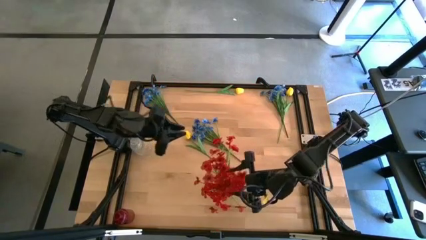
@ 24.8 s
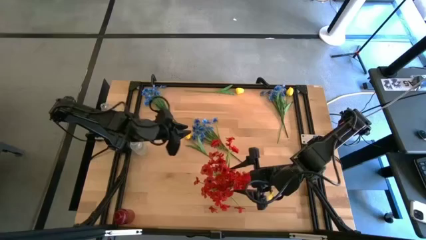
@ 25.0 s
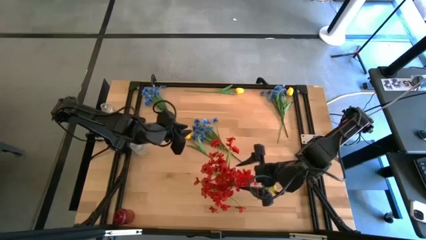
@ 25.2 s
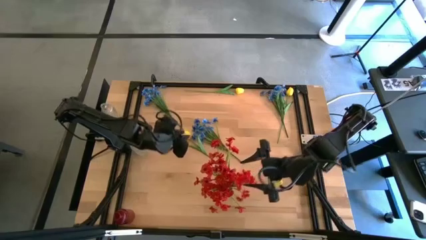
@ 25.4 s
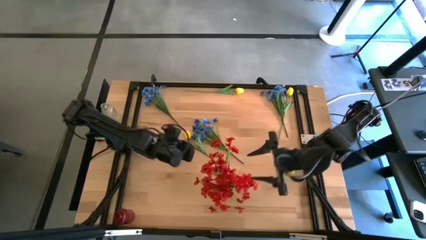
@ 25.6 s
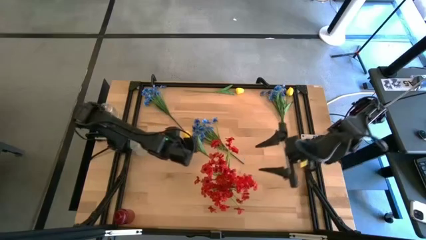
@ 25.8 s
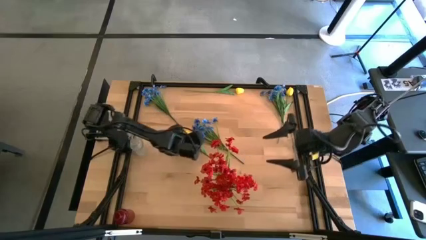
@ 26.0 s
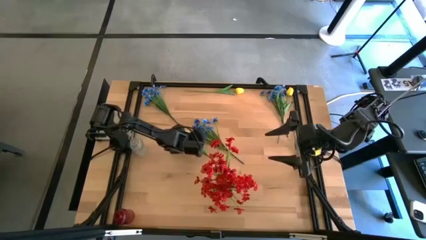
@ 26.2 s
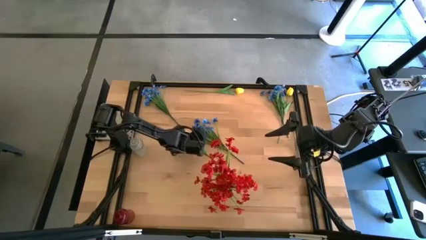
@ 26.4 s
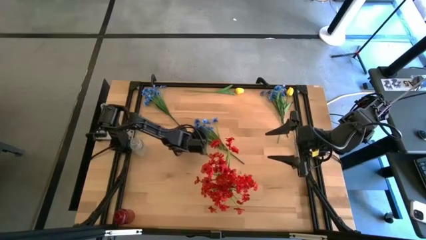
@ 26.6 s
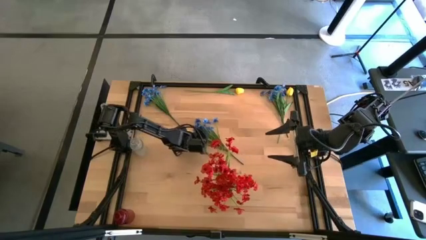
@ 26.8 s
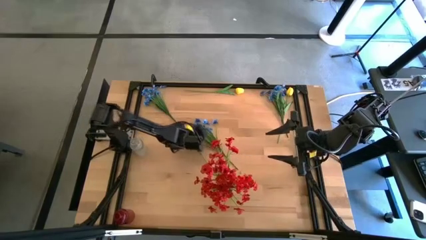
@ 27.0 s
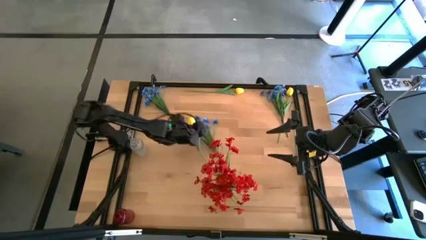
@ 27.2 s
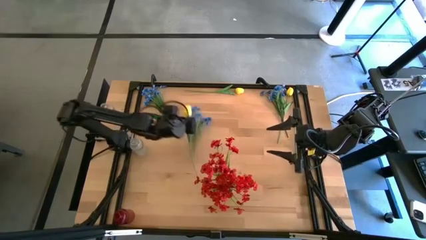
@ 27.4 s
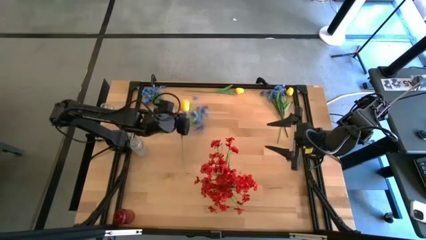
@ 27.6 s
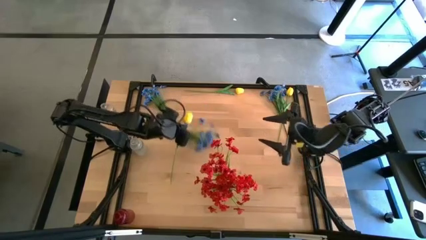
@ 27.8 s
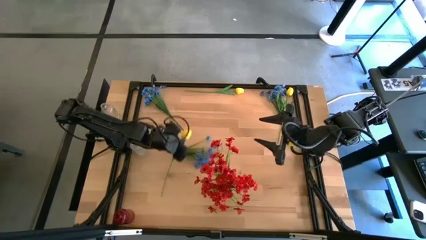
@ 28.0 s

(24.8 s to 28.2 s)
Task: Sort flowers into vase by color
Put the bottom yellow tulip into the transparent vase

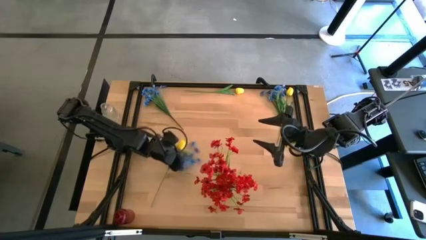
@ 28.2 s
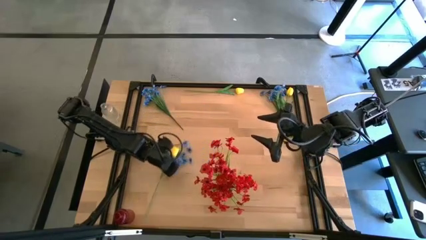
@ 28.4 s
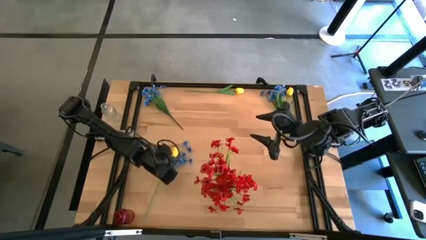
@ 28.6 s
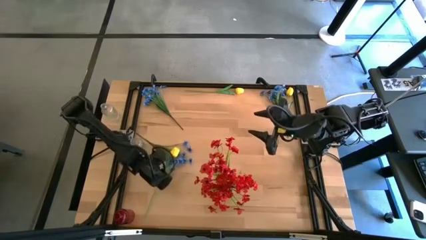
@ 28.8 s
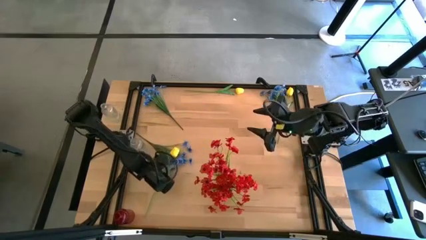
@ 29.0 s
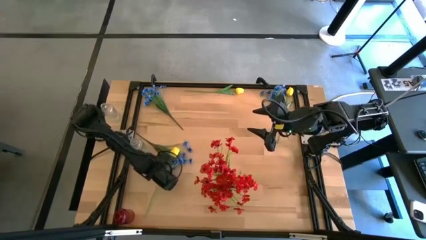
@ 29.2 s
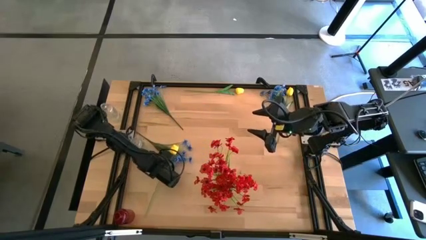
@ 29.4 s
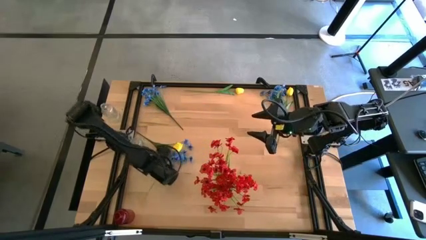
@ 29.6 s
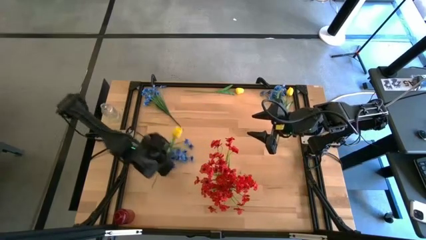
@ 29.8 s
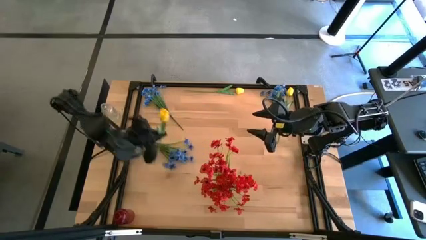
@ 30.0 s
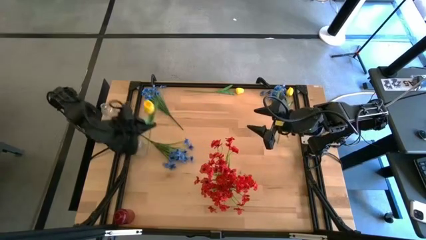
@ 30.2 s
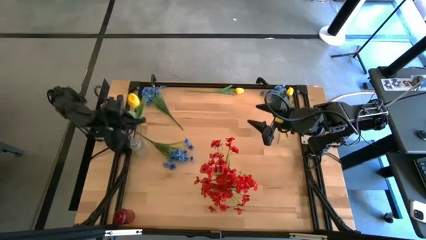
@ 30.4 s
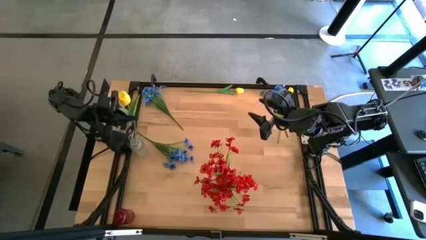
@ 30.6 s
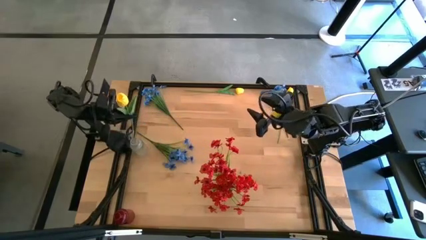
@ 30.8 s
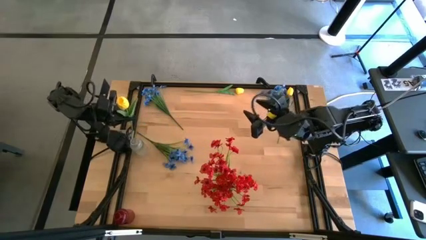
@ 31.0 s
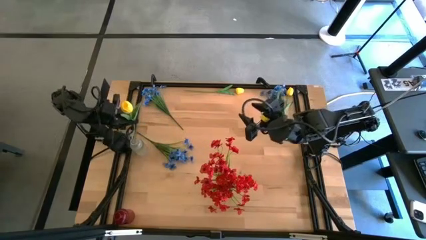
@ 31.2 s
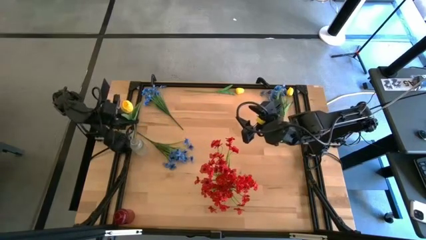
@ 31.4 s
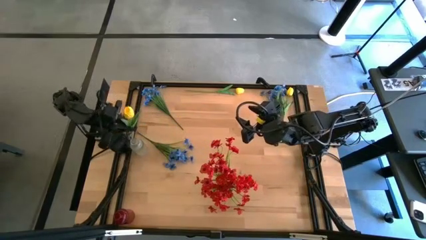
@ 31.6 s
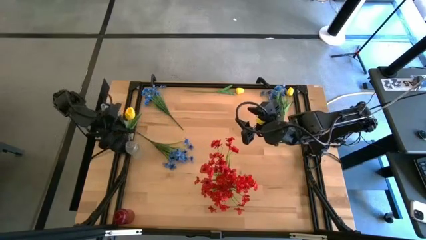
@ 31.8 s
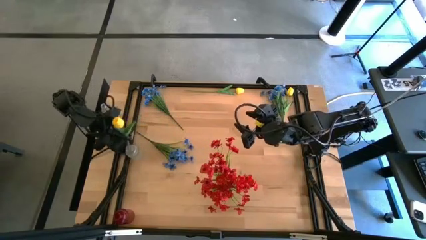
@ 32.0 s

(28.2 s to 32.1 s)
Put the bottom yellow tulip into the transparent vase

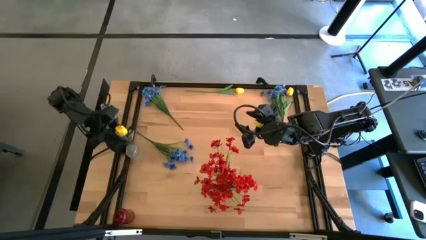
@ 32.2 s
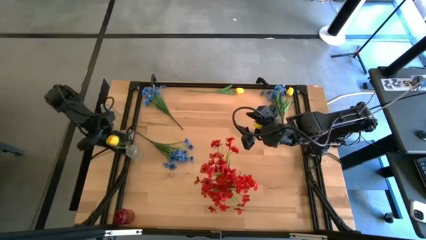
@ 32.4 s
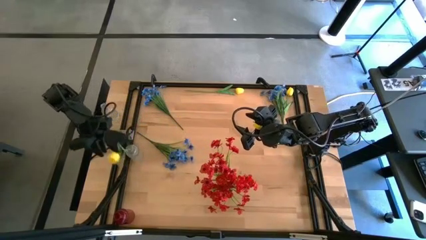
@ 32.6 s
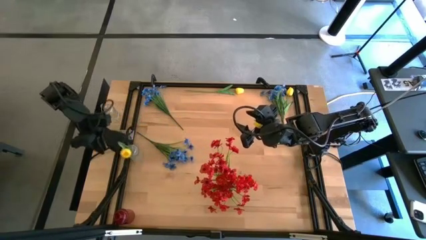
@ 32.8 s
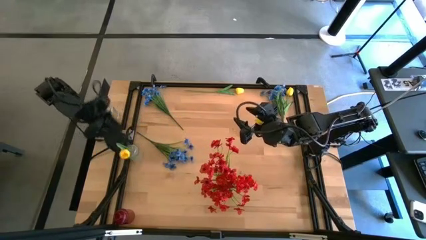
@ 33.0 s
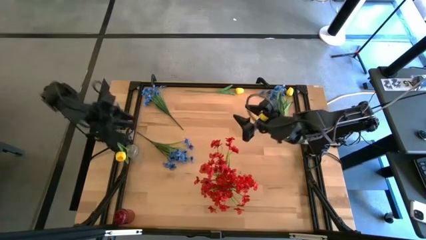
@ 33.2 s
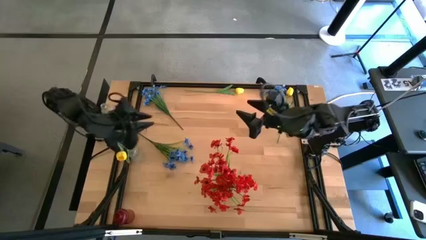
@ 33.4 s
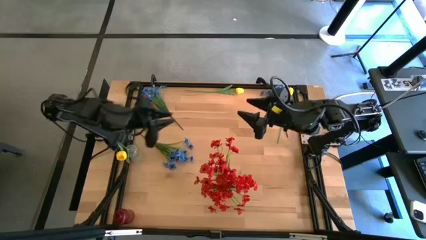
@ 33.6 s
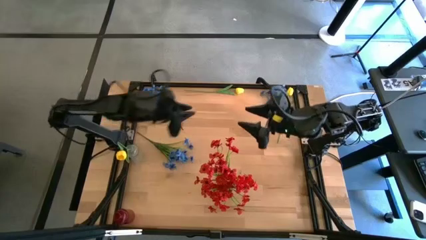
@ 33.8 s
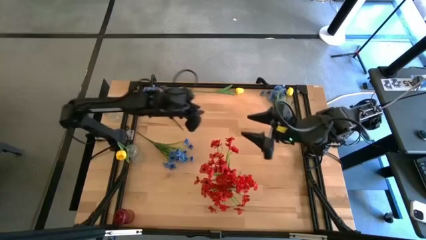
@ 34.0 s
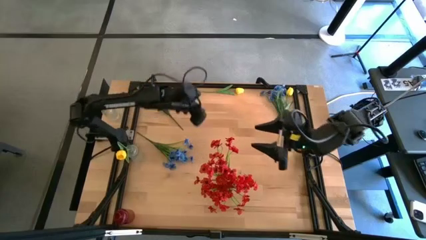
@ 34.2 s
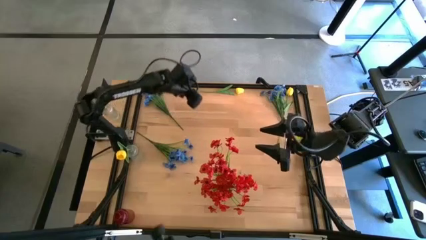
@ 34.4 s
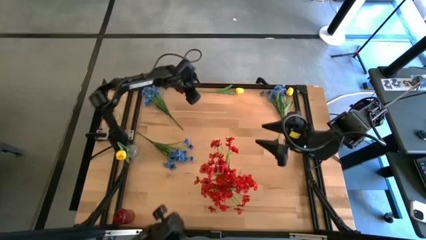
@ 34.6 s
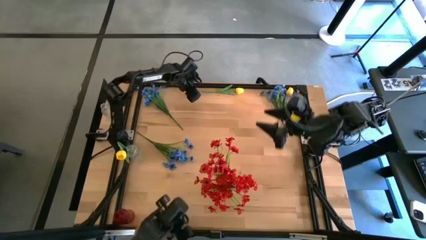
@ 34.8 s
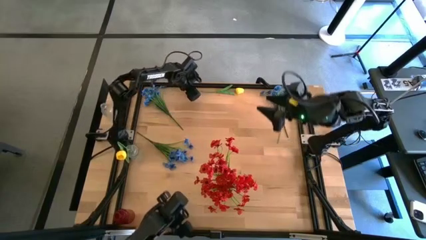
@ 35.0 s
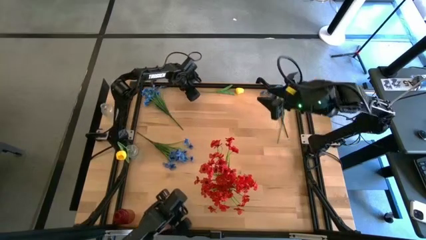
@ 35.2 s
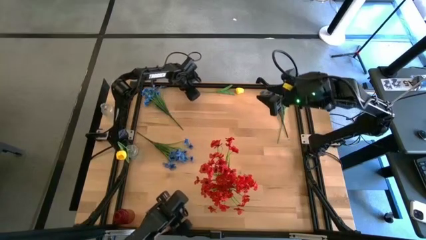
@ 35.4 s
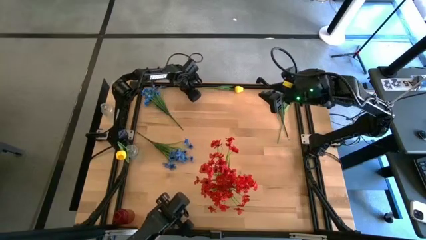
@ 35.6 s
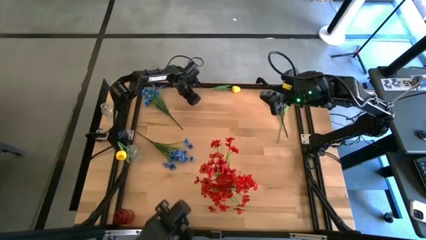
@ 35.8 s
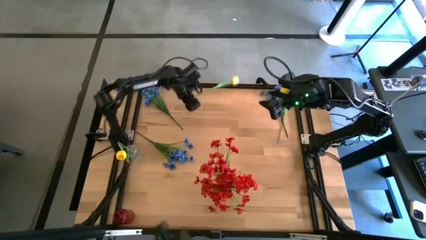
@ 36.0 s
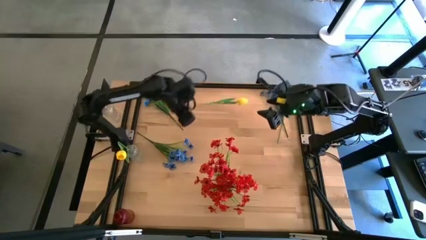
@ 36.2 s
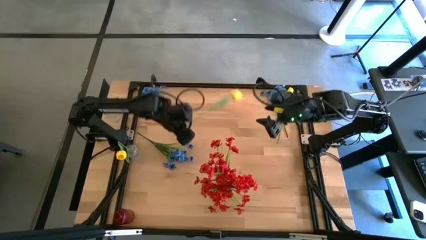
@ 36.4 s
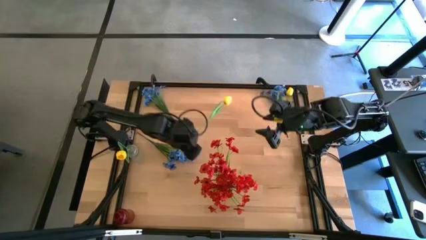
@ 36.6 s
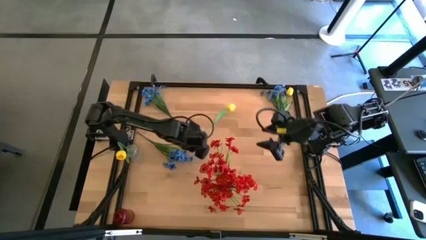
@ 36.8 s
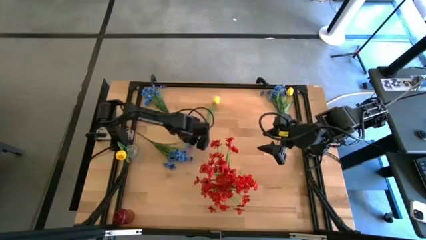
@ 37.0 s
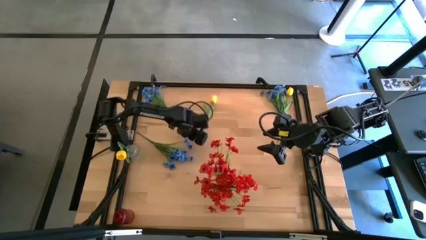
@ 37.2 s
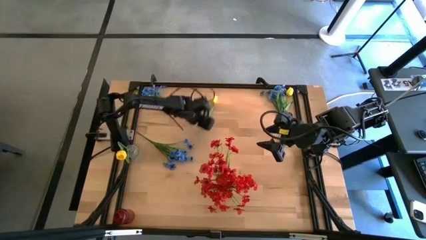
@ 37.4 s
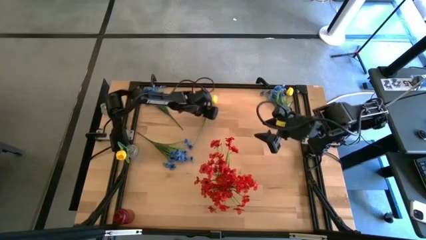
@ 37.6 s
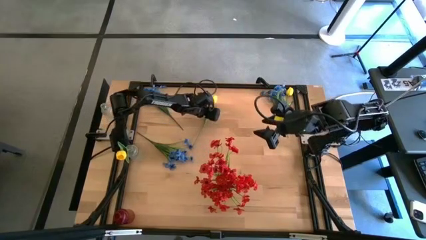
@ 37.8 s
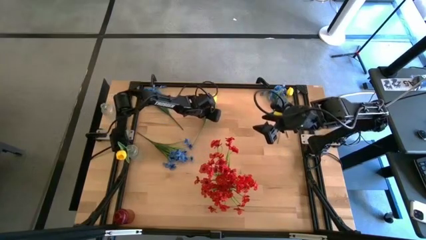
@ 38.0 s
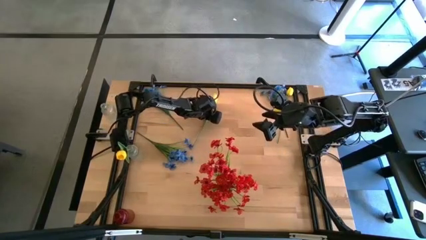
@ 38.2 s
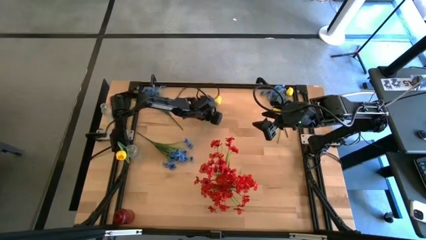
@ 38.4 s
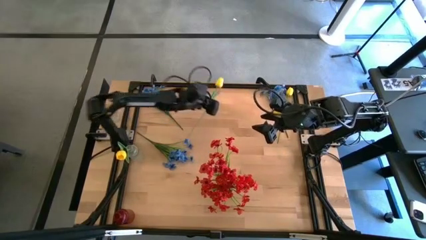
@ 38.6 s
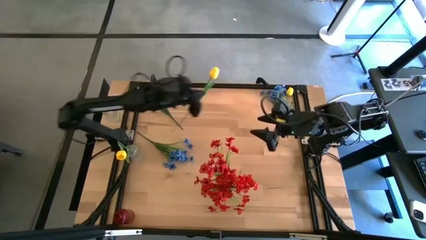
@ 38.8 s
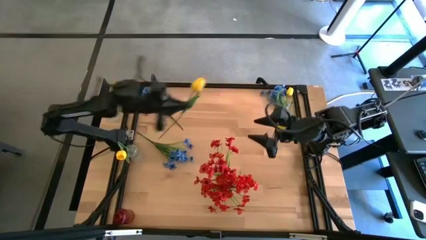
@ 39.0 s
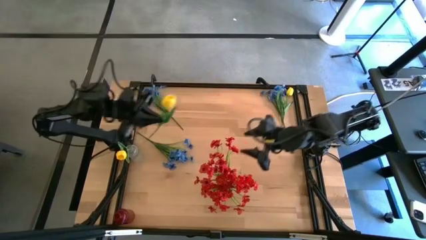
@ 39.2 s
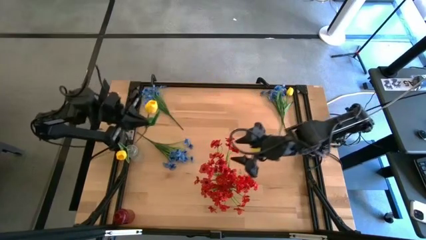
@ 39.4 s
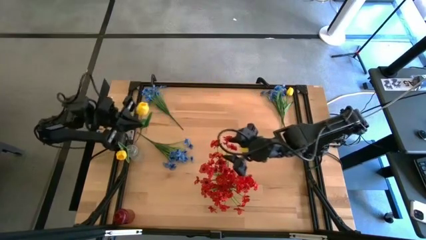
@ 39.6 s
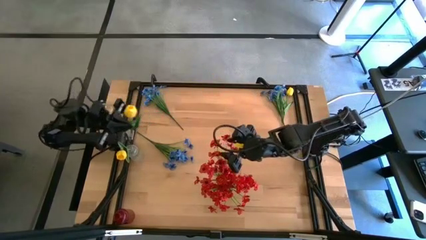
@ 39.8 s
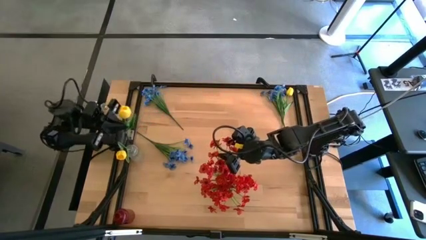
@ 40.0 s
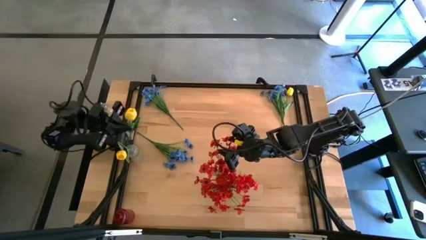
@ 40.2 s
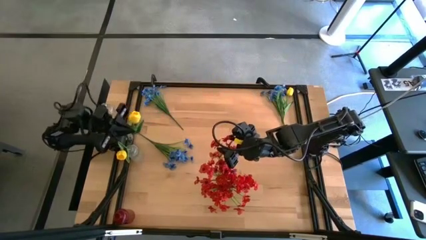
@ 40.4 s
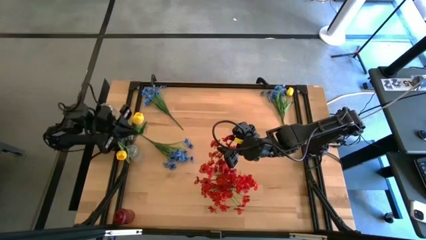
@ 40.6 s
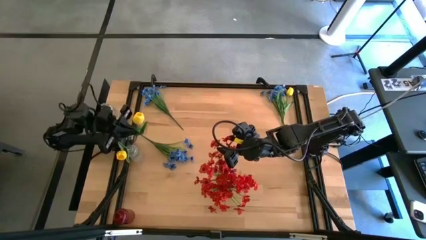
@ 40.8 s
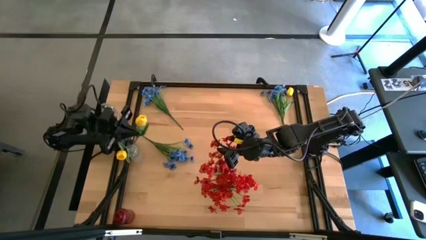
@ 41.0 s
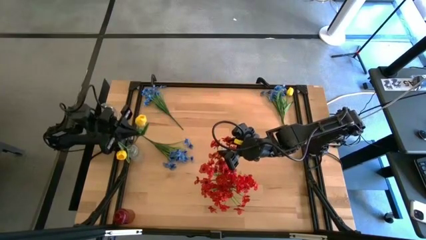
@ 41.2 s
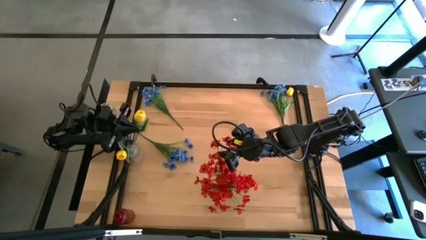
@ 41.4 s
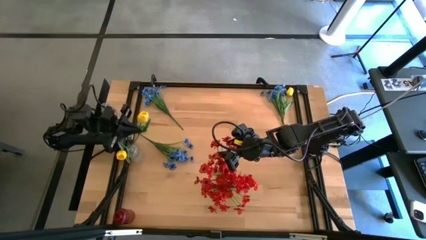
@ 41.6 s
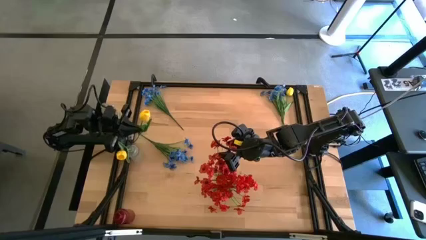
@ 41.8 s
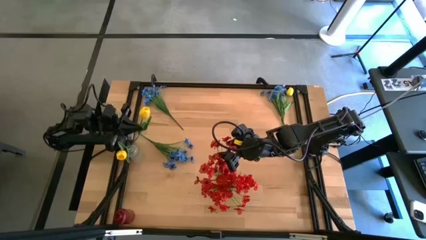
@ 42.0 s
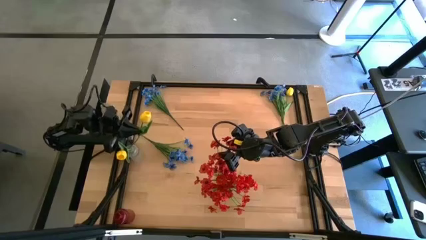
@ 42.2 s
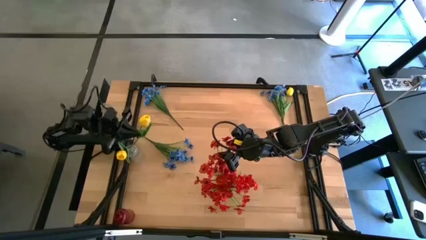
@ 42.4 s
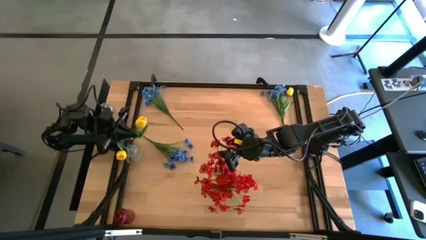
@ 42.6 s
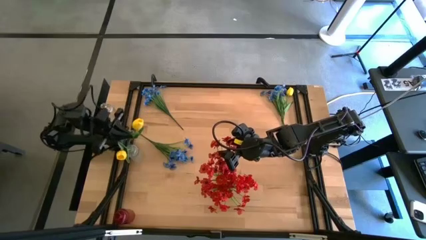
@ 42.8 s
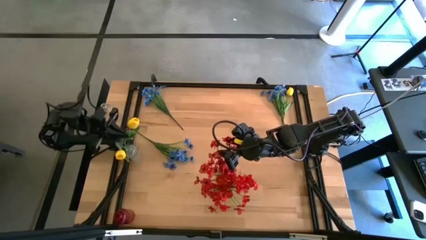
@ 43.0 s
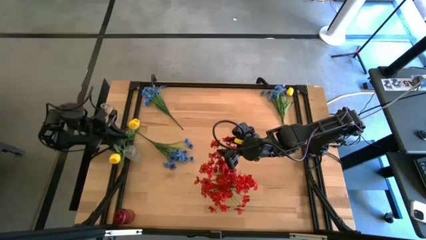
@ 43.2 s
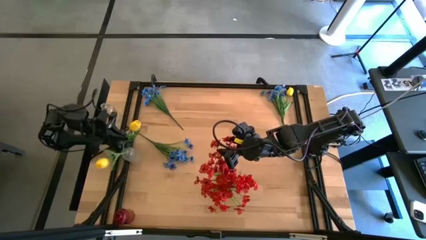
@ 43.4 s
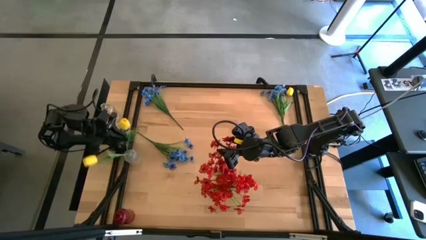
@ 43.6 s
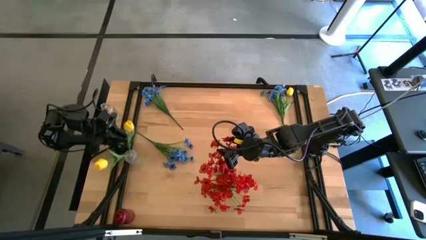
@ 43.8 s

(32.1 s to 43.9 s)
Put the left yellow tulip into the transparent vase
